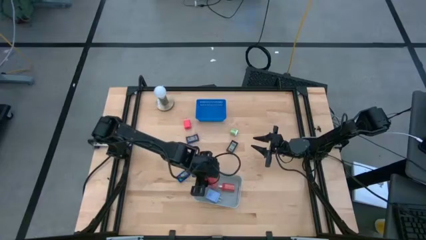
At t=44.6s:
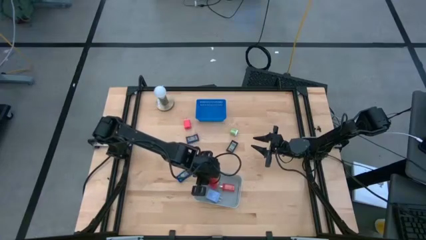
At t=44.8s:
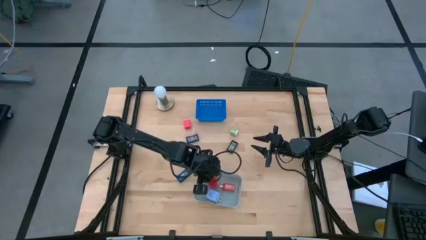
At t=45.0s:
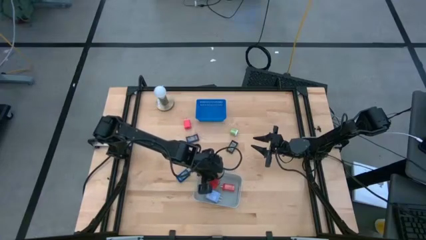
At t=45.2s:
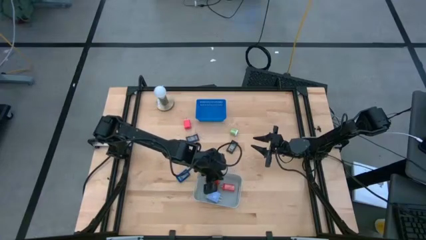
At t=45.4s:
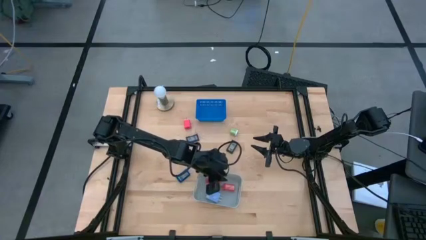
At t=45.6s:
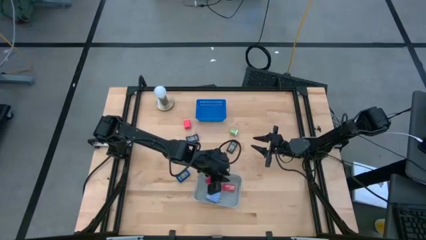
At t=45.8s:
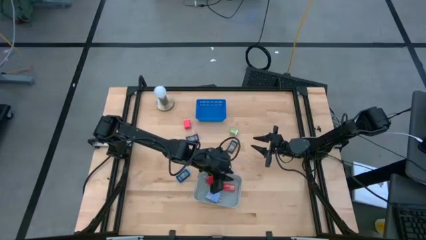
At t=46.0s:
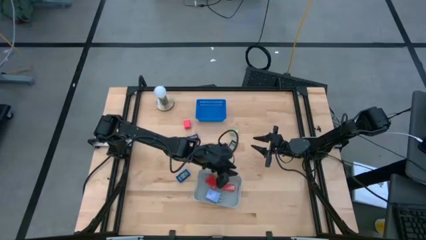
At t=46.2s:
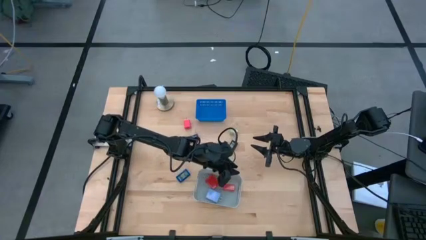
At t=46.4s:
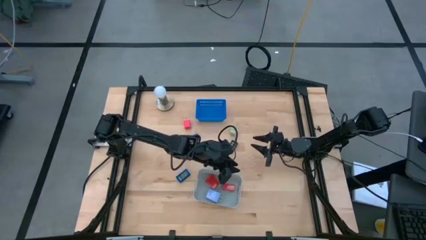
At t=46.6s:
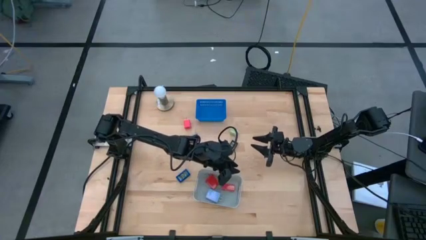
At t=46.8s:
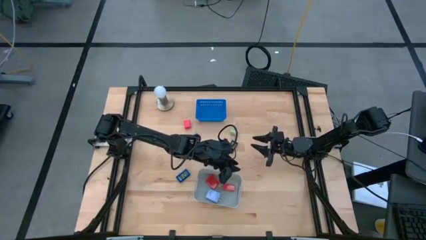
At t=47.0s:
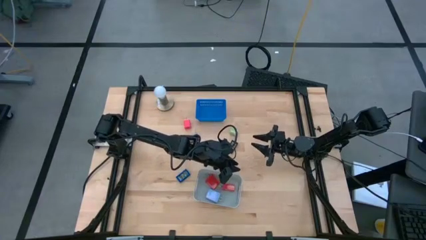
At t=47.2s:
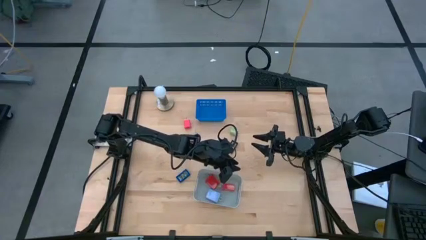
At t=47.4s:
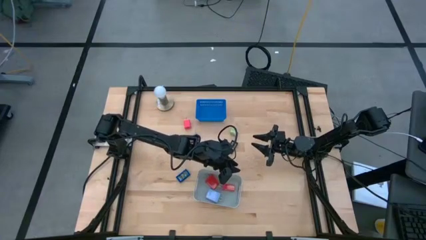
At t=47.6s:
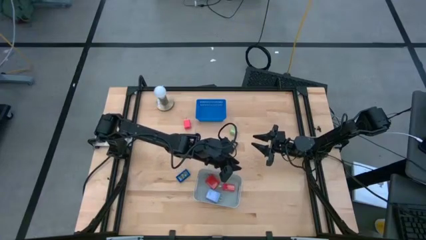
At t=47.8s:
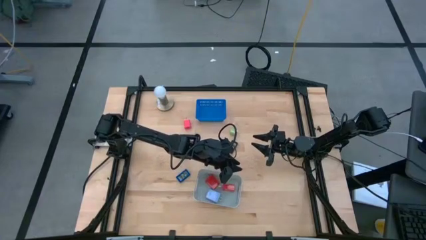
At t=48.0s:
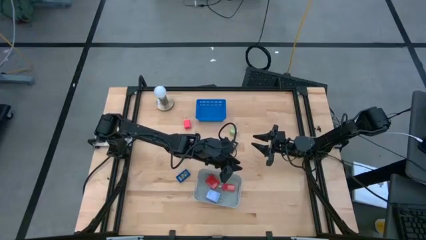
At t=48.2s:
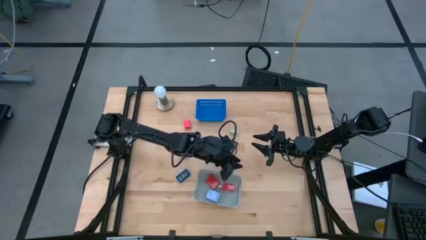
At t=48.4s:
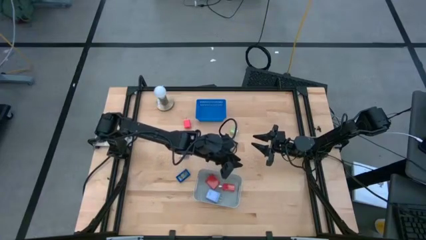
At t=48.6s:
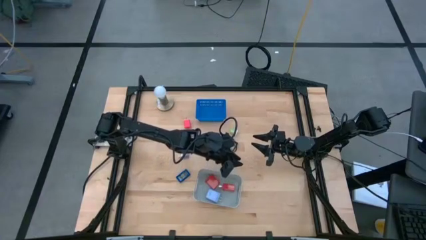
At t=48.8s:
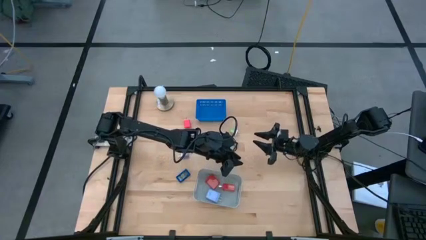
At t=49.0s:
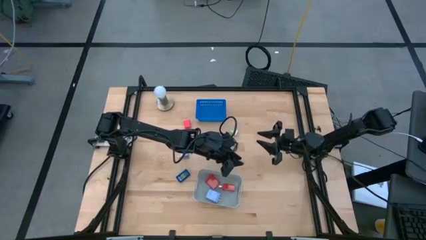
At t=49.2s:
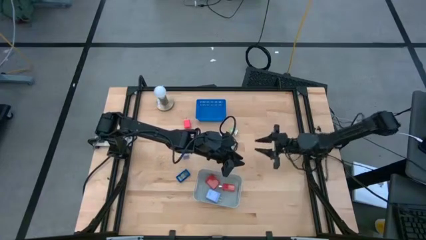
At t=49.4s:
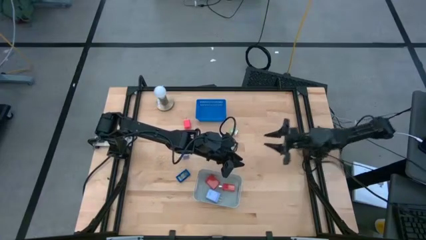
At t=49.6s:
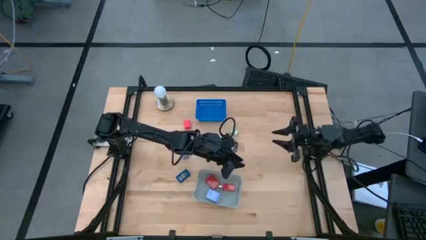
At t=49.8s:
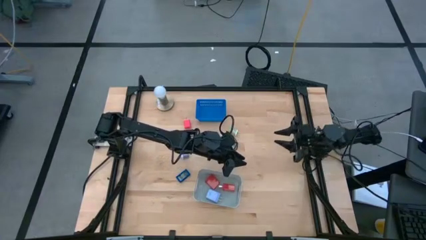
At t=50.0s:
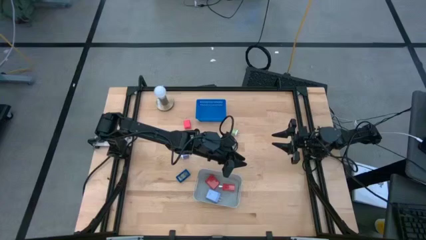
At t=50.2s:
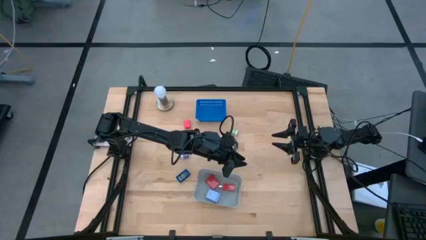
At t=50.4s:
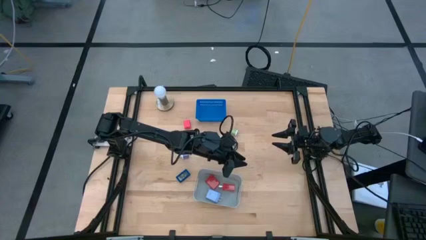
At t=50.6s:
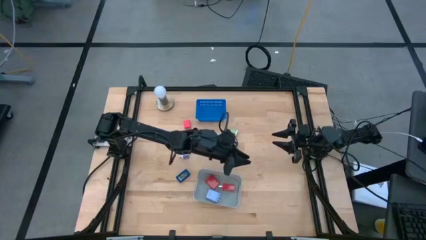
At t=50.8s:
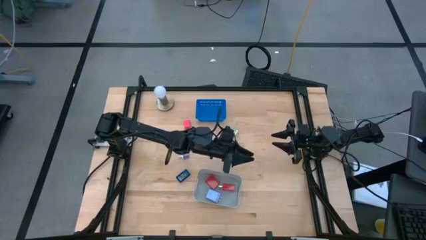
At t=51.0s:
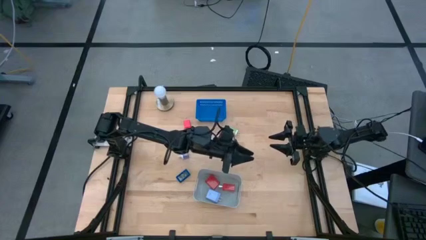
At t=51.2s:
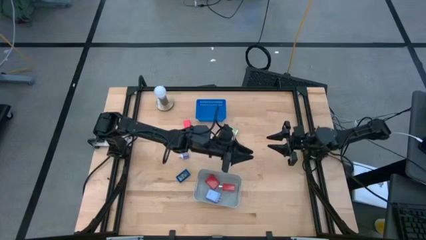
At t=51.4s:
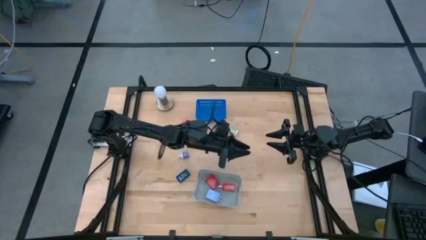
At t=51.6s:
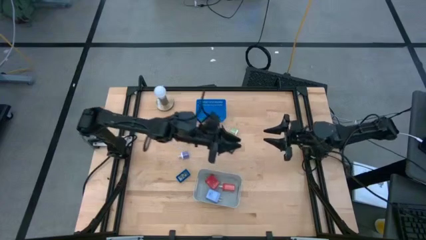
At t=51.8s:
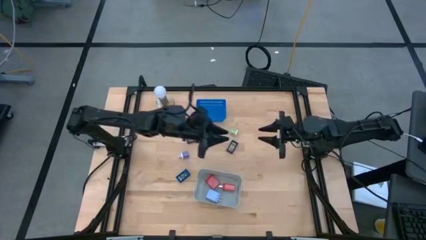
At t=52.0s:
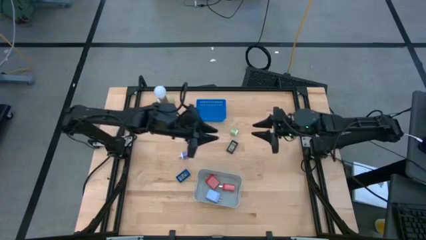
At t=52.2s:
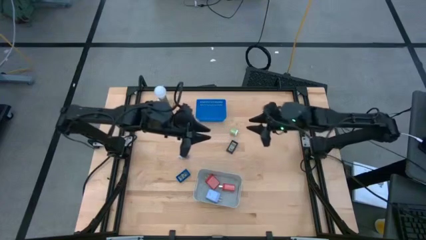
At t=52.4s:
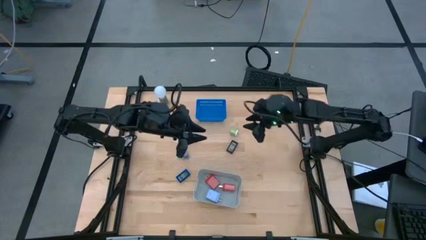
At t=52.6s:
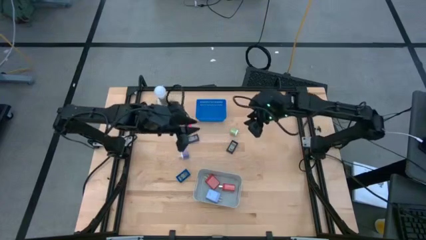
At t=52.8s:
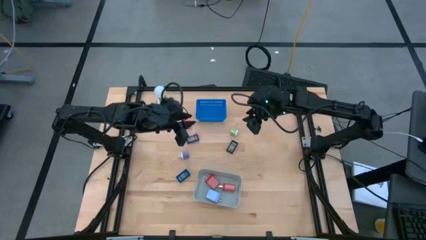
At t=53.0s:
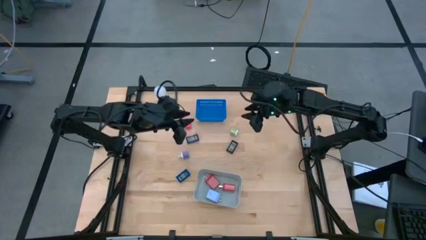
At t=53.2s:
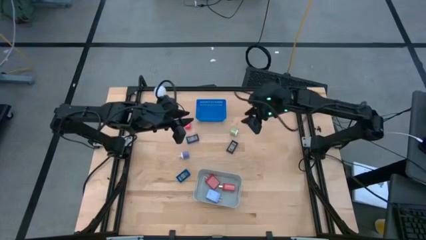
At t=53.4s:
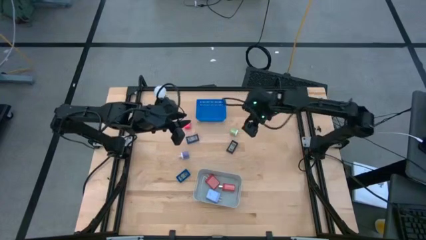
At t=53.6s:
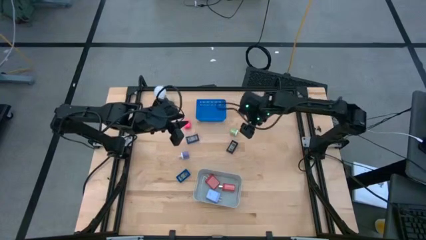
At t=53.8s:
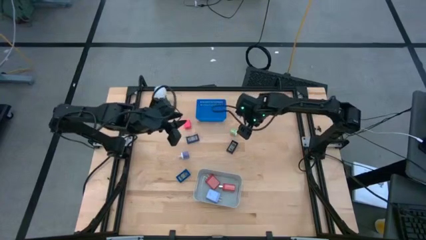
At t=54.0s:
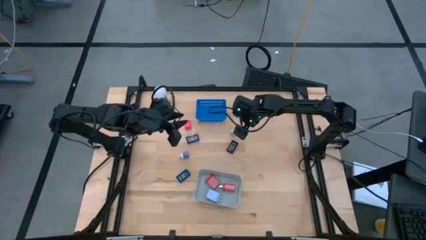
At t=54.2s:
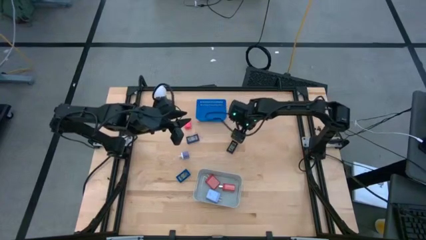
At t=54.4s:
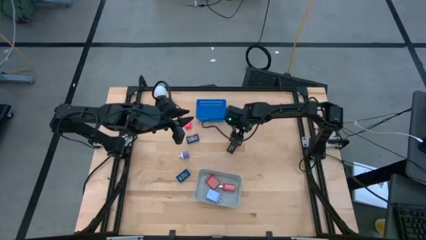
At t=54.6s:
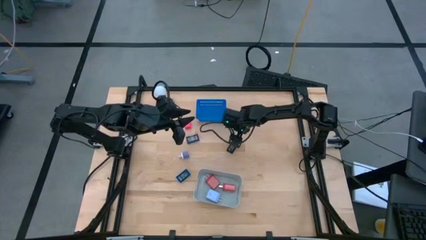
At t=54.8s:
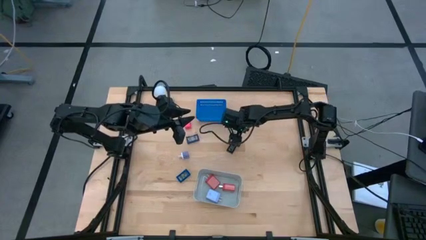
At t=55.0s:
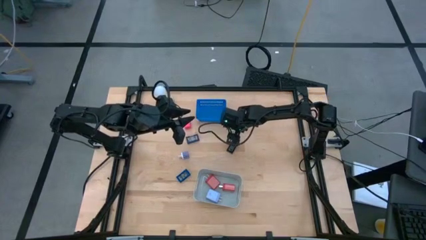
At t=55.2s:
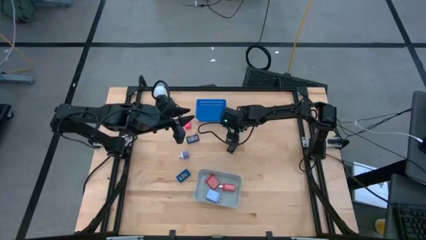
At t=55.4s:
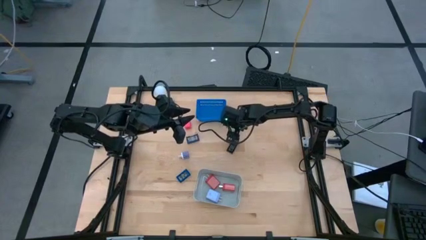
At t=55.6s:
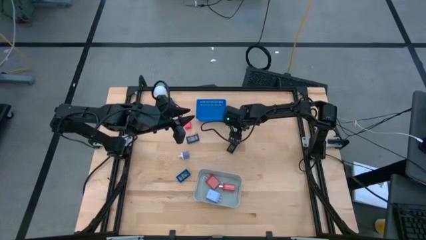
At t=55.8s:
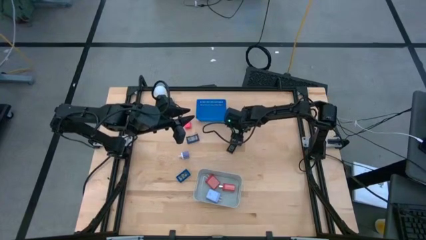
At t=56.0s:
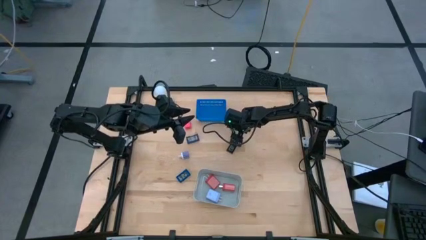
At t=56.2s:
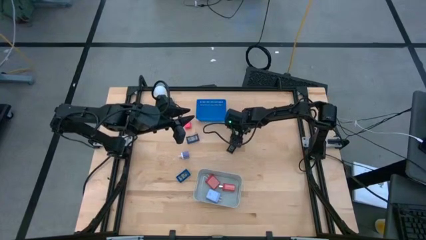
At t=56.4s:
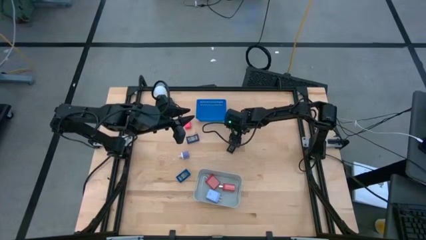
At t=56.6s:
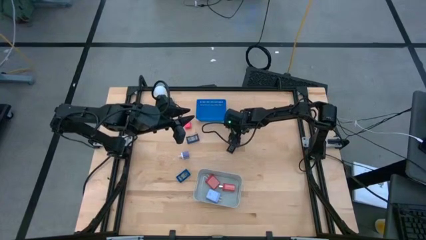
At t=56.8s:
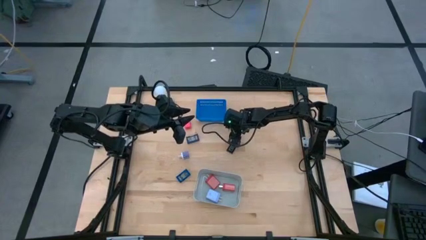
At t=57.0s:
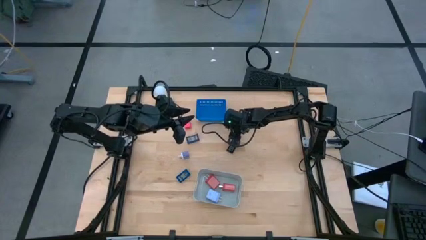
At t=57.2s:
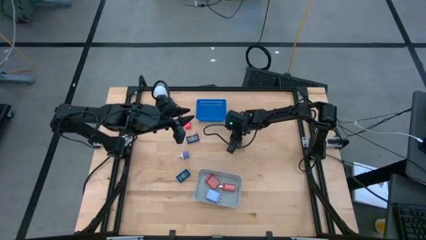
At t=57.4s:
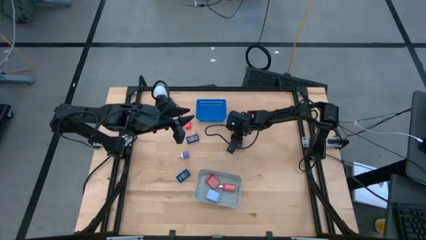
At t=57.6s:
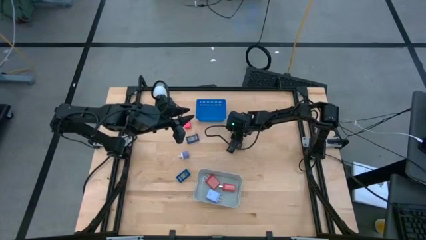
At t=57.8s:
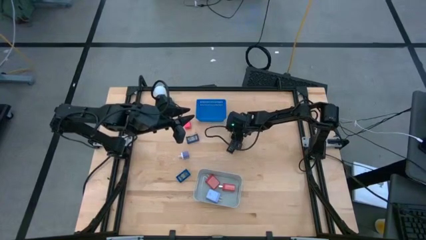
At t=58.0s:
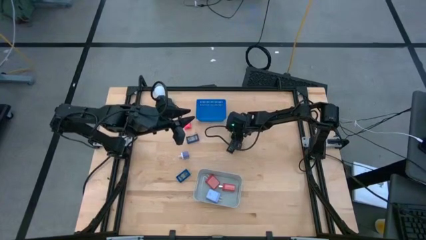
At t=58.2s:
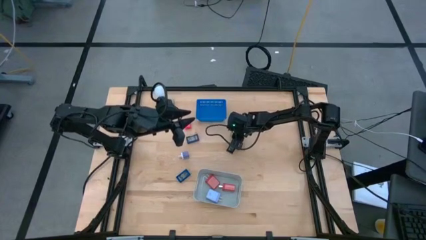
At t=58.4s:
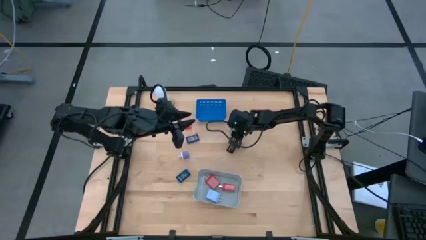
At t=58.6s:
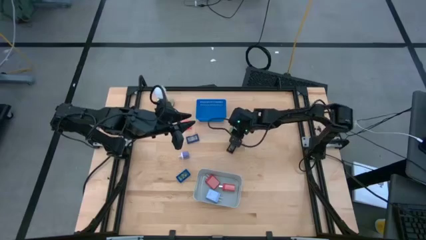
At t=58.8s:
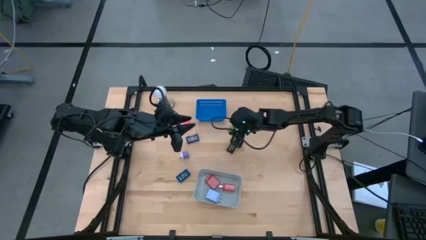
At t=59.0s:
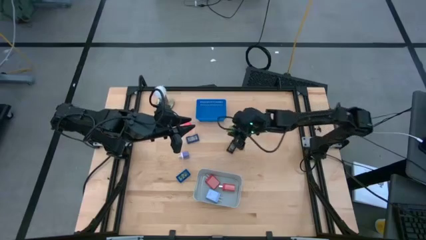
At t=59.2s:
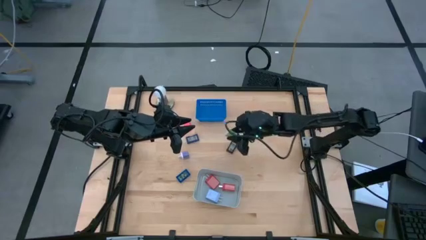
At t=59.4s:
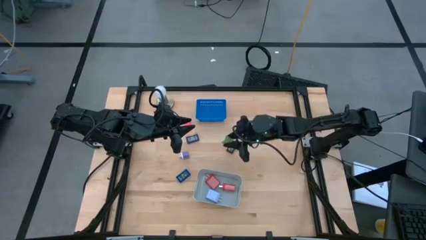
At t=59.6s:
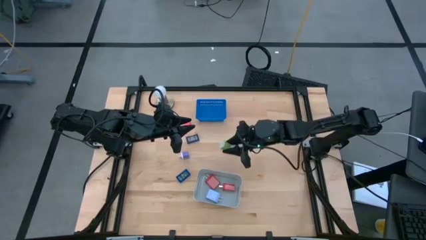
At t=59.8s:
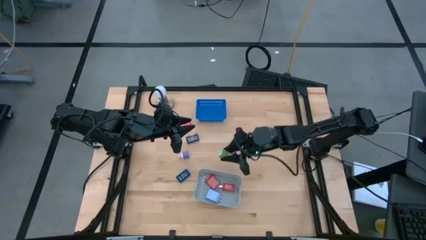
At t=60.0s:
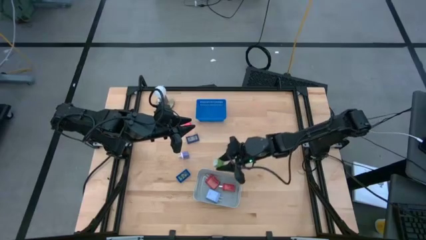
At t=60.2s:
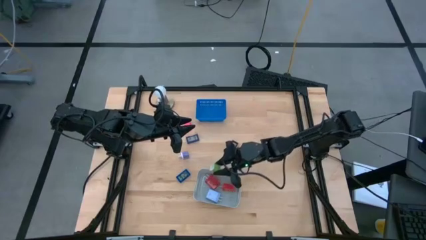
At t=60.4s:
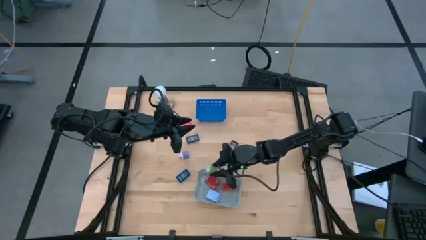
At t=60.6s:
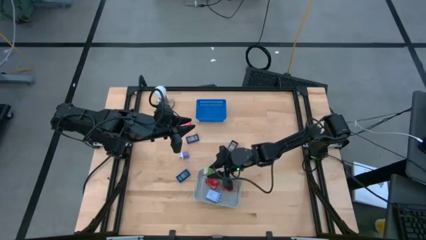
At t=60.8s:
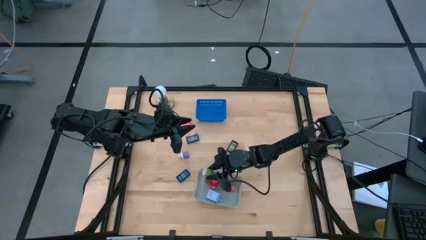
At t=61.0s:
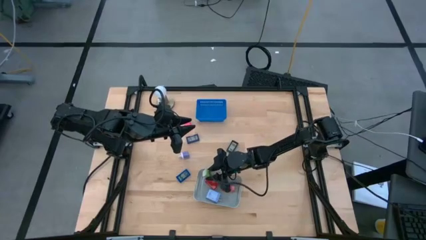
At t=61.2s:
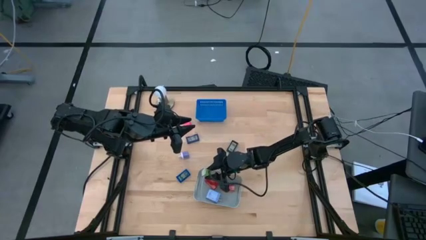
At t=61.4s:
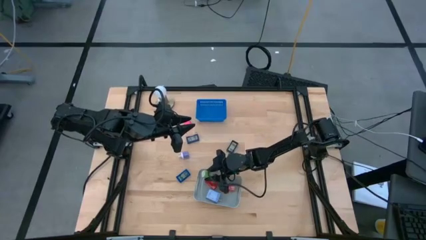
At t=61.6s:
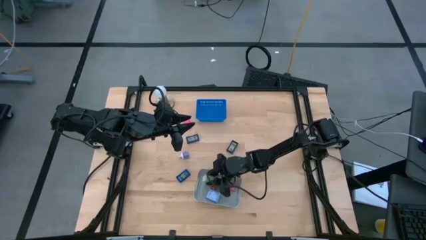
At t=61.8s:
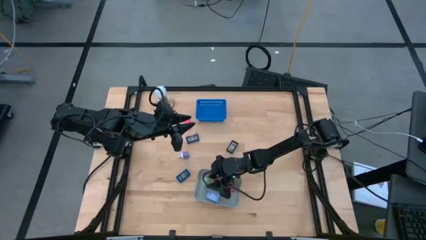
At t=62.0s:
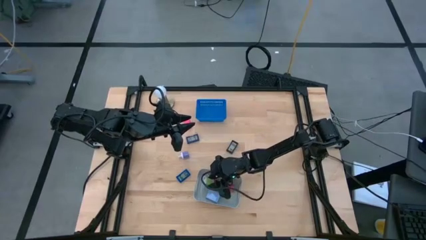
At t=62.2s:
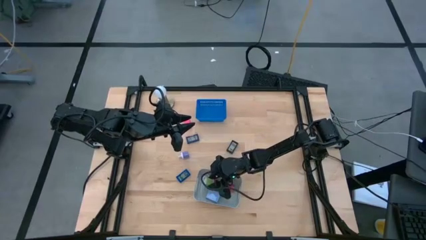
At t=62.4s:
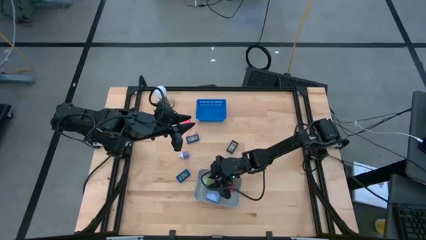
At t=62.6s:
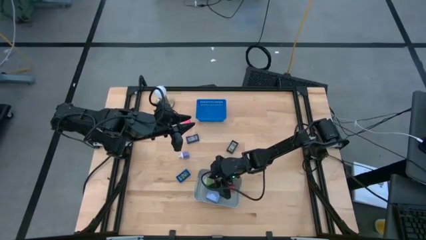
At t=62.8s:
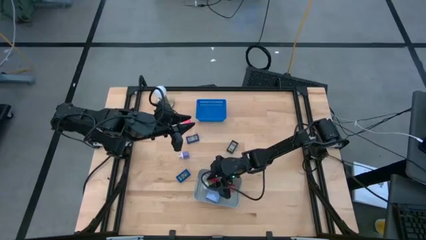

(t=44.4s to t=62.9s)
Task: Pick & Place Office items
Put the green charger adapter into the gray bin
